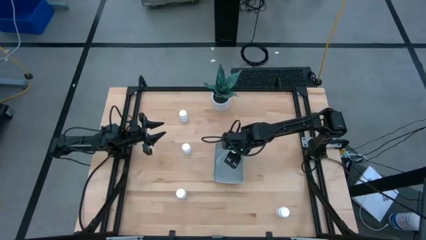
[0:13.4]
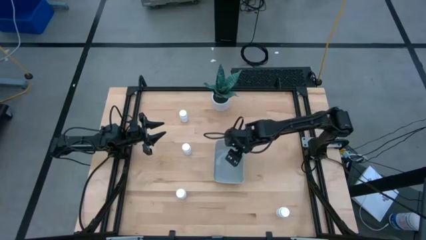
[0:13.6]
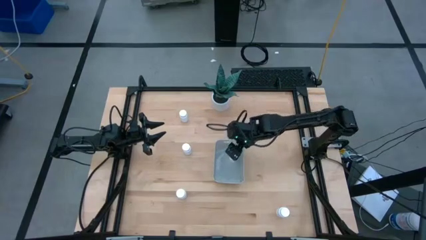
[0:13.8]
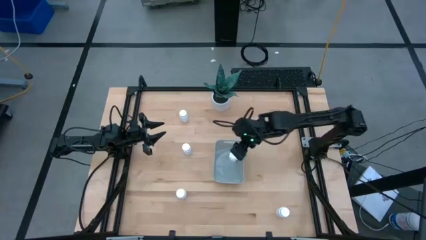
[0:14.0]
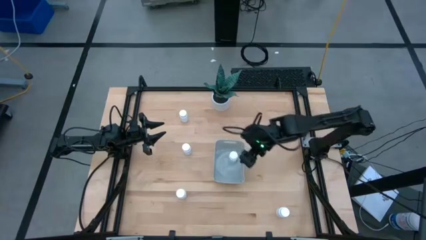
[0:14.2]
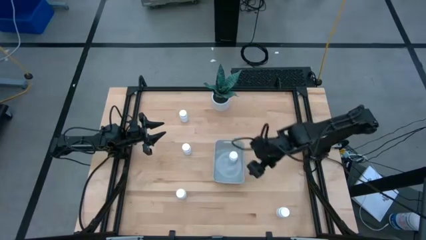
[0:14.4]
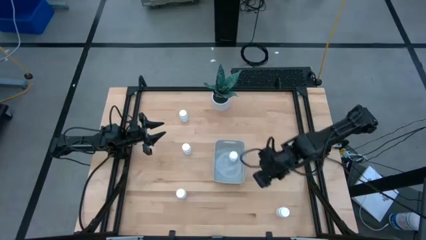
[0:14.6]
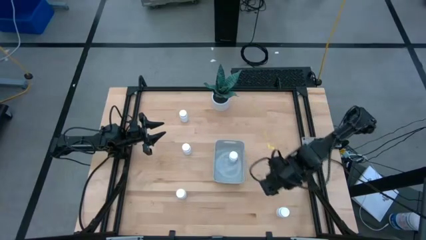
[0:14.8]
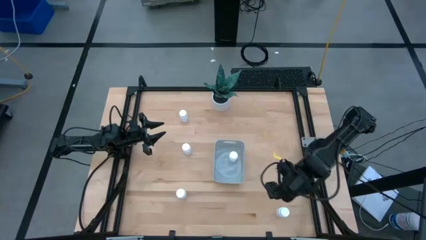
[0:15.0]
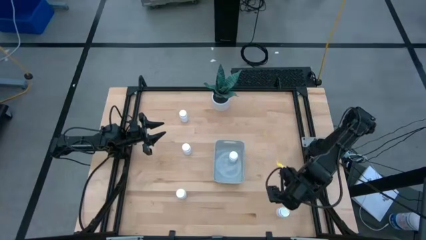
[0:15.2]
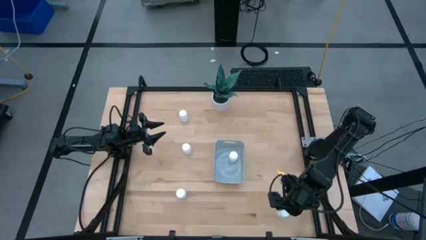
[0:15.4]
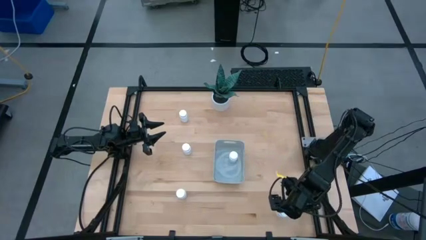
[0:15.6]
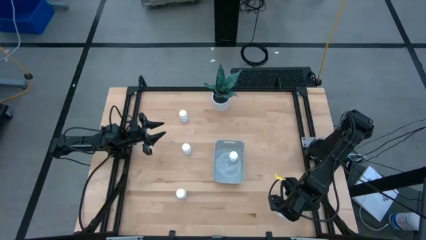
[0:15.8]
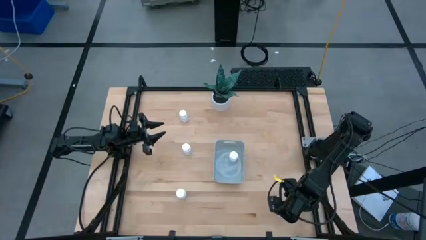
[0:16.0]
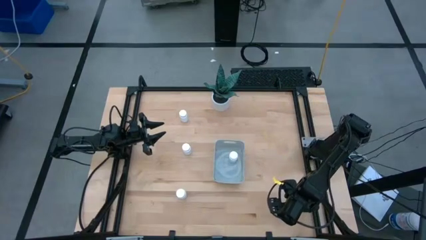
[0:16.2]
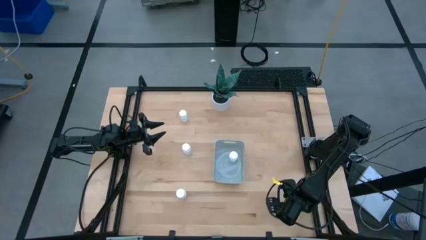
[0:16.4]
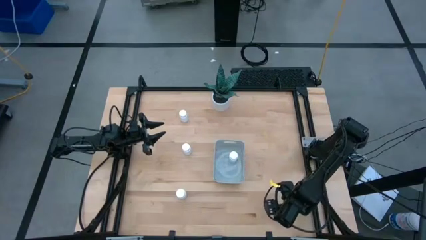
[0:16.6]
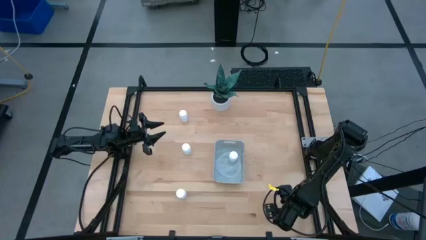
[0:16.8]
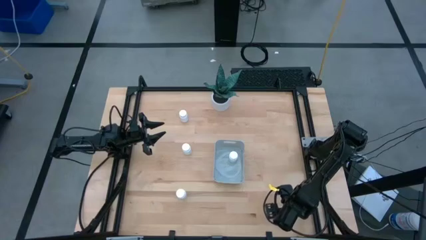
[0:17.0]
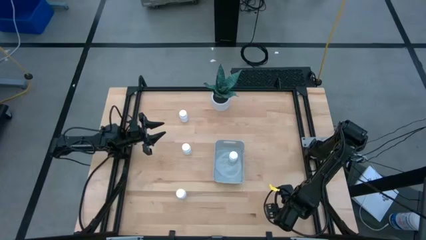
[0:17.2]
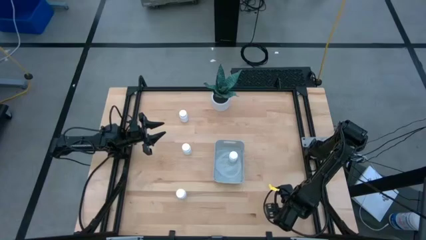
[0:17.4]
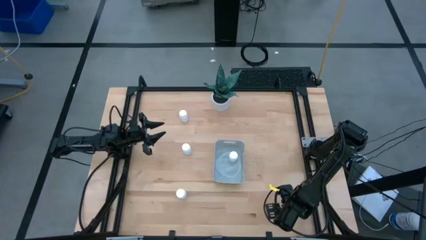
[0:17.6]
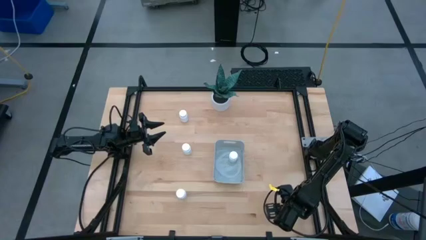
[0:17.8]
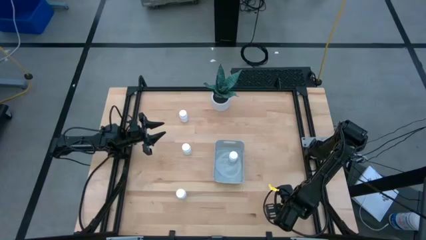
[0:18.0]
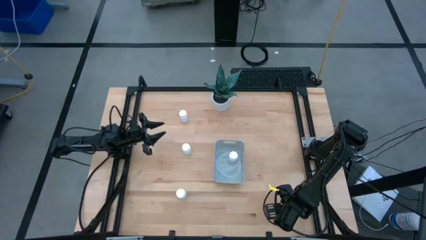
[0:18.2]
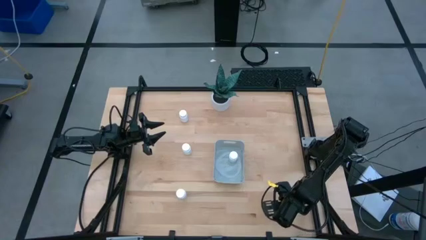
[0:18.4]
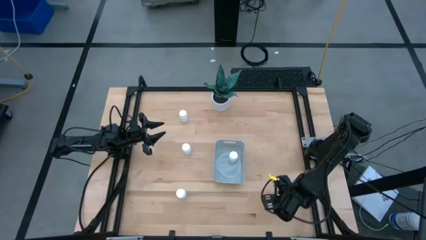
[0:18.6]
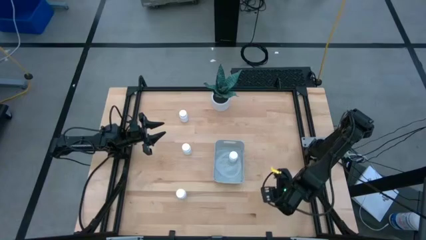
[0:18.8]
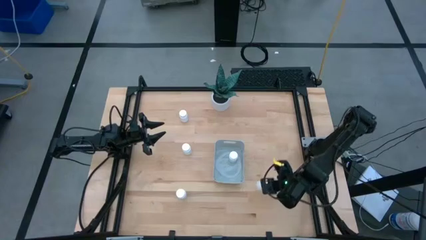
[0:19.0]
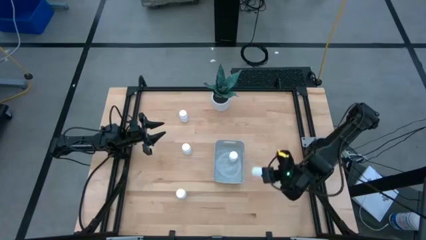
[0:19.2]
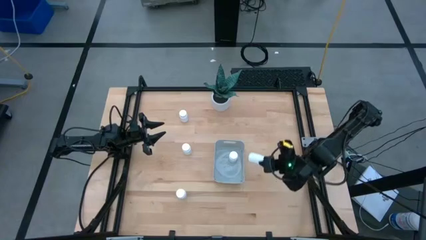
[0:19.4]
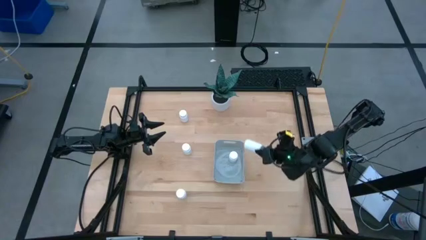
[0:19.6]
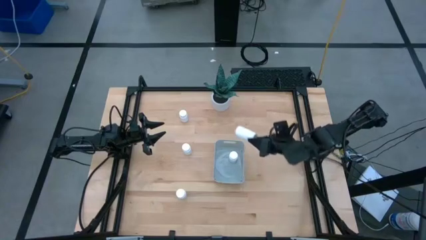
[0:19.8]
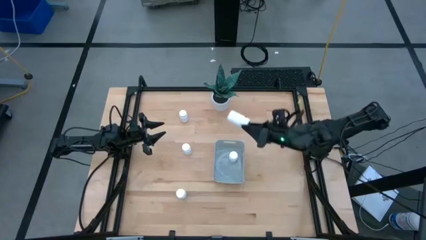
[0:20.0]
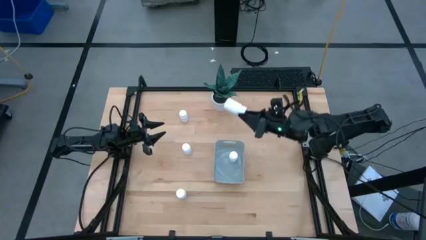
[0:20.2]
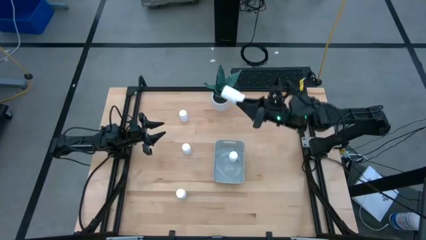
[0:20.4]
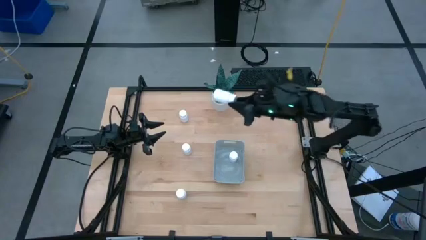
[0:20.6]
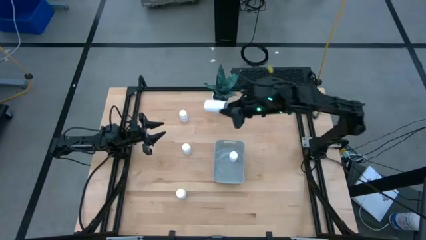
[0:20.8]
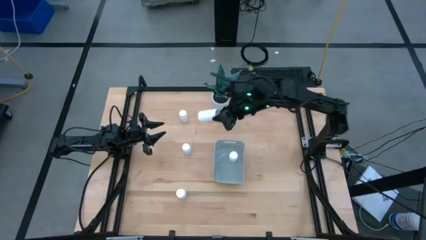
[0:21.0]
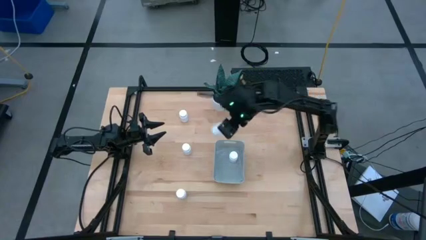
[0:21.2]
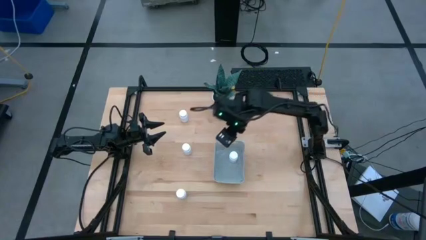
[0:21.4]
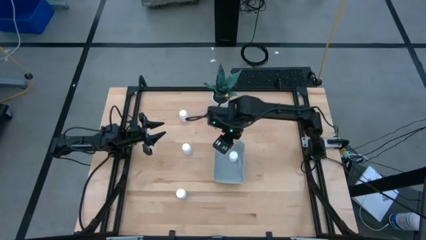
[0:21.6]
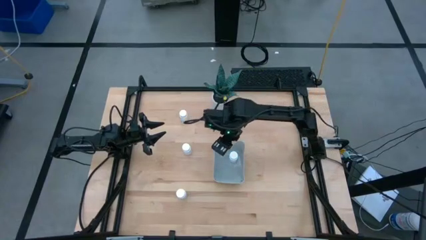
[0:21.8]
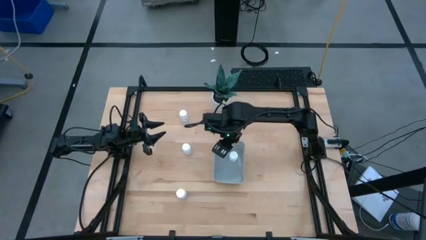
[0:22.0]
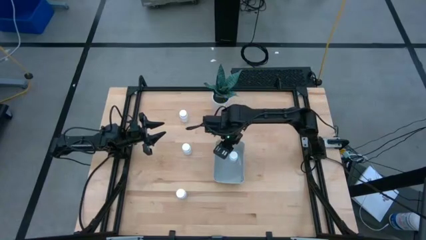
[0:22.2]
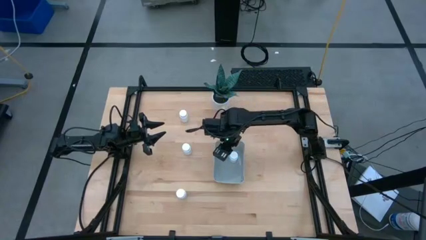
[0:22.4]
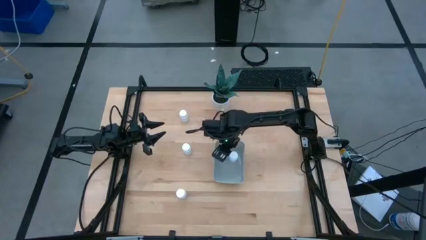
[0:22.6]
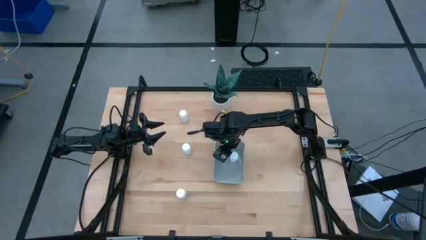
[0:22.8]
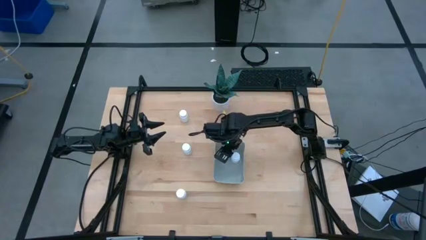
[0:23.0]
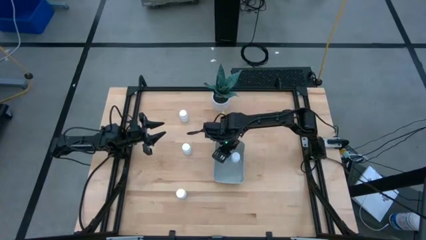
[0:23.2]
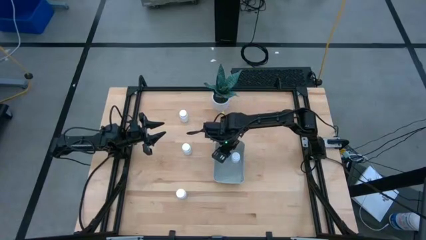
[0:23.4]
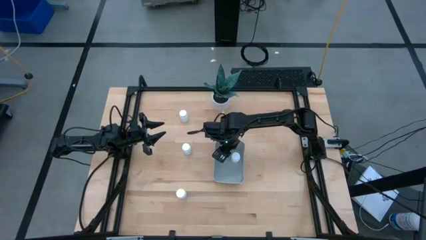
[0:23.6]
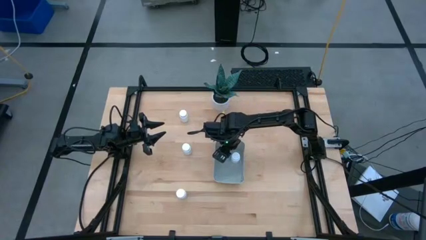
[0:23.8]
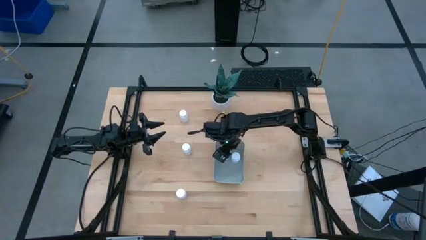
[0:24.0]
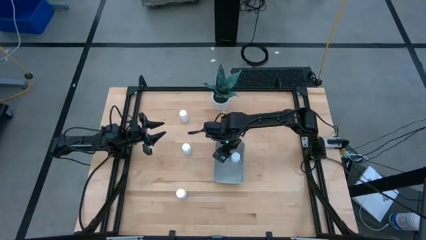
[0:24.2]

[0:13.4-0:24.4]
Task: Pick and place pill bottles into a basket
Put the white pill bottle into the gray bin

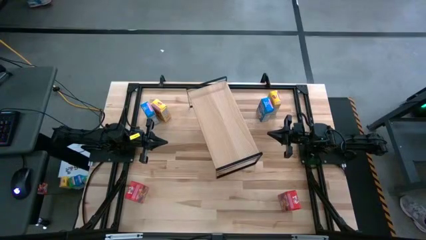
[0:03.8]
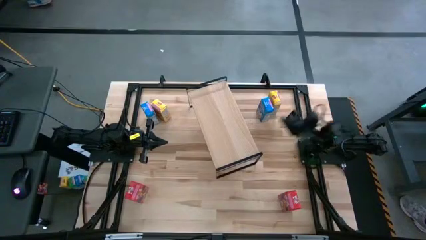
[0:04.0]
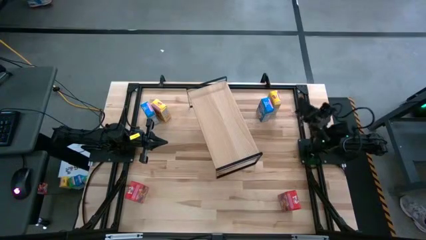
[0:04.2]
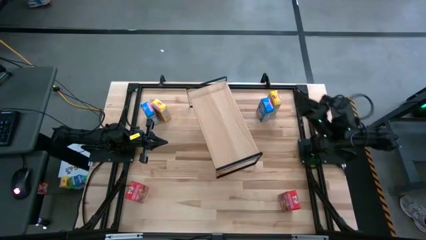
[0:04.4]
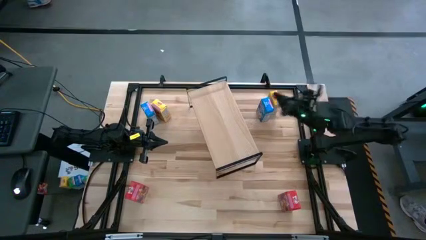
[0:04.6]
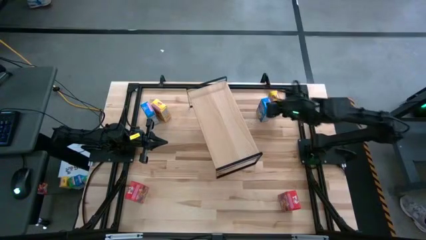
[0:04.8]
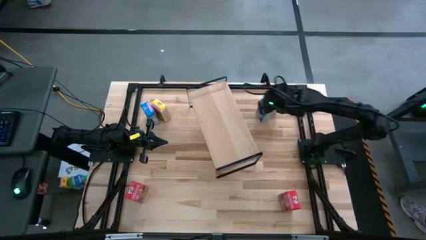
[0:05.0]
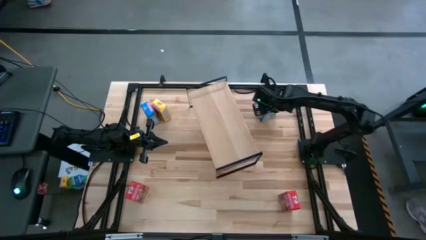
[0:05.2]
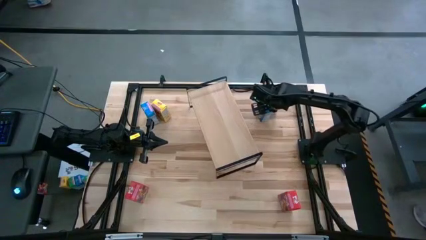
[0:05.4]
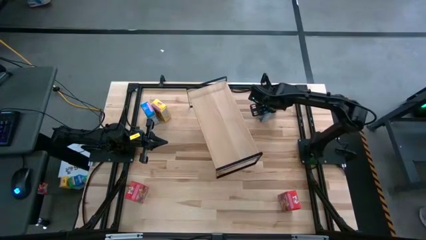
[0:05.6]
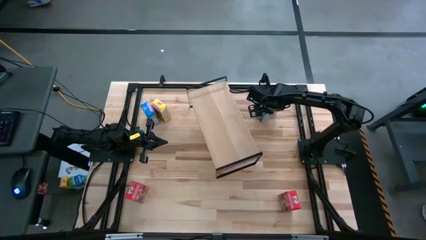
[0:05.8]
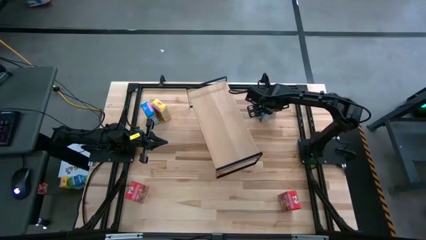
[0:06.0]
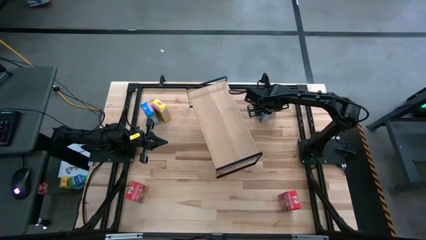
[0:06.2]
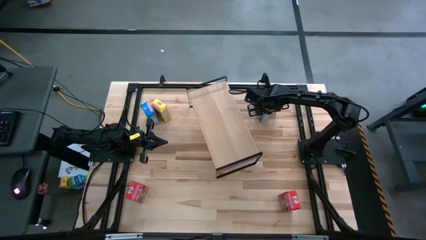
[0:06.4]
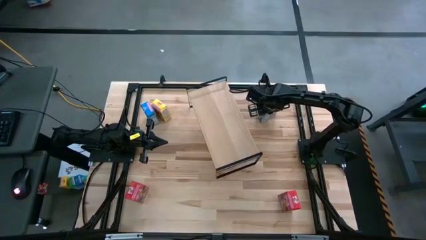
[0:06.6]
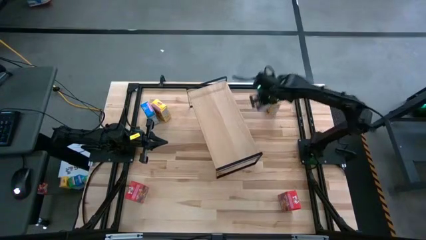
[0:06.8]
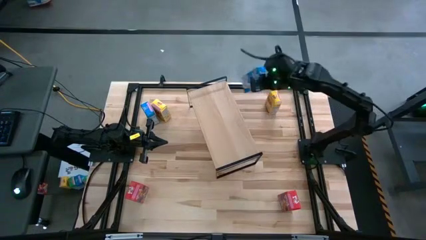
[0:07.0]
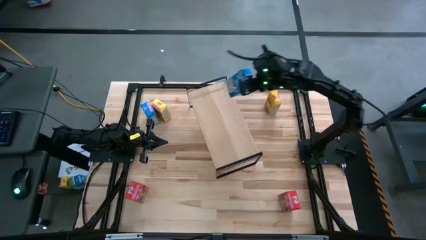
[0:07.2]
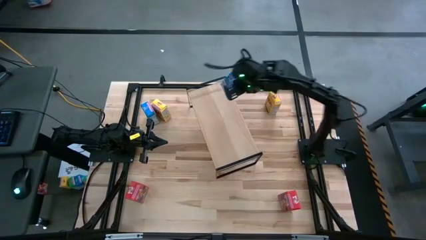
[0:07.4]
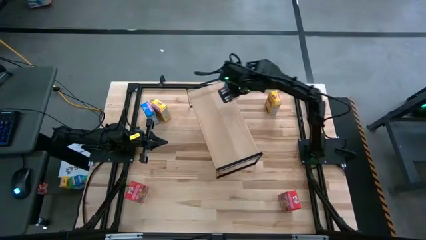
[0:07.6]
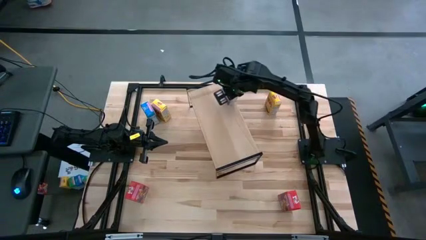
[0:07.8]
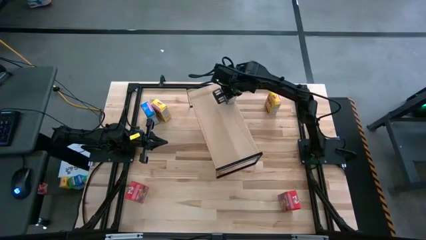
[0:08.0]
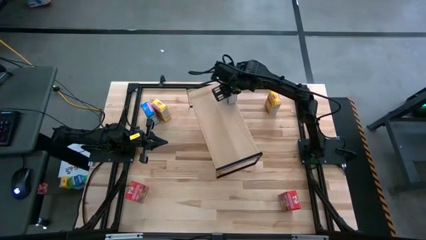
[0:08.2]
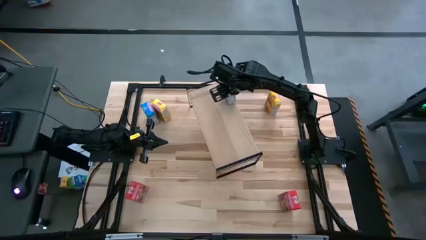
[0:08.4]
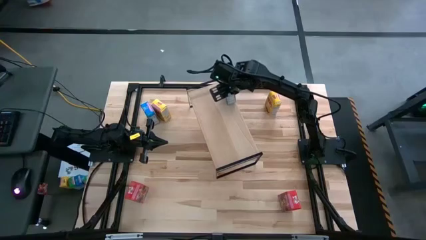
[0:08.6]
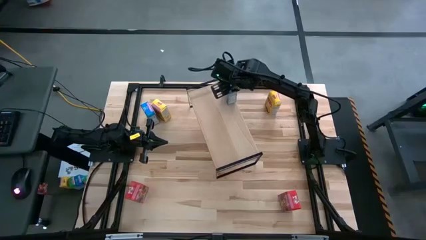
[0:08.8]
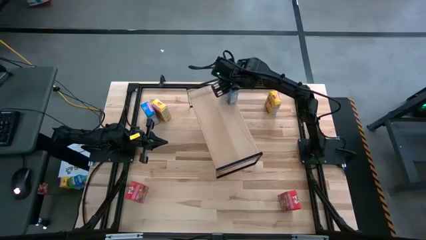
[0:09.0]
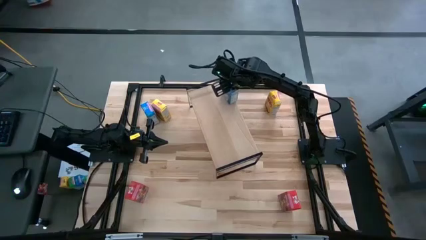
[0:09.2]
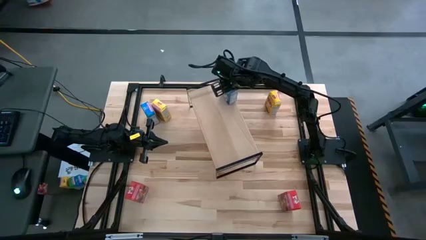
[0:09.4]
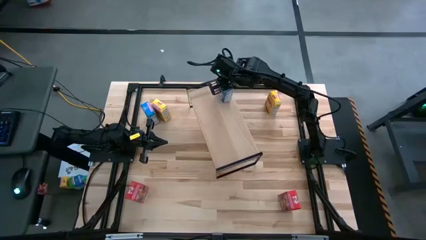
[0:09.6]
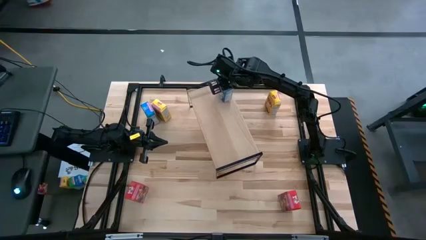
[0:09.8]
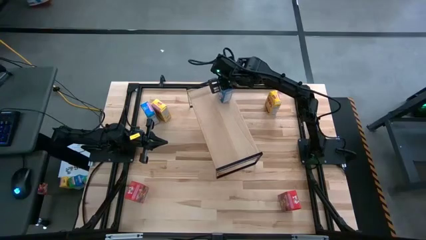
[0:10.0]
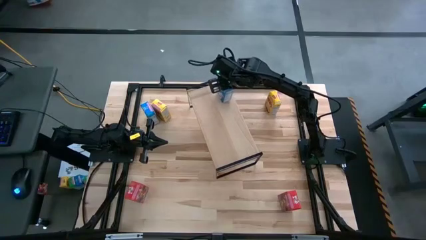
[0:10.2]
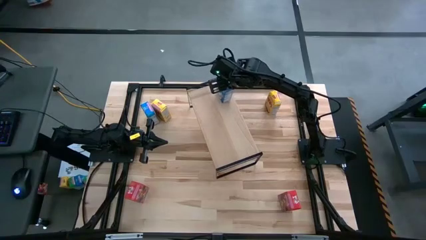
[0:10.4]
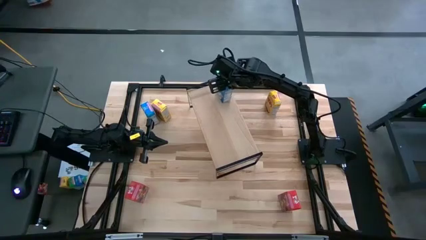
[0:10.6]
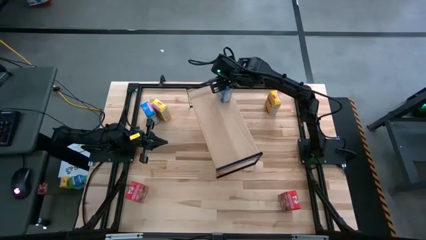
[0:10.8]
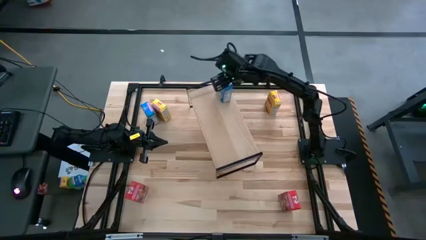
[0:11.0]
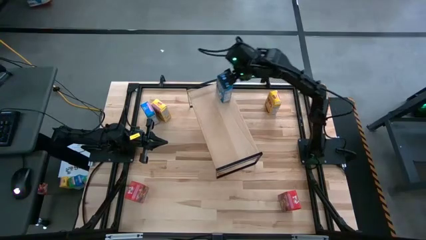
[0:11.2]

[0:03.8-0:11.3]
Task: Stack cereal on shelf
Put the right blue cereal box on the shelf
